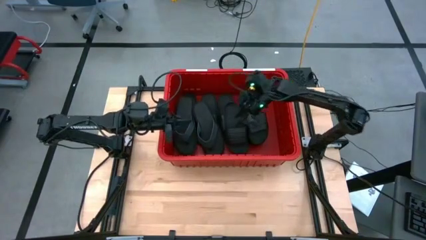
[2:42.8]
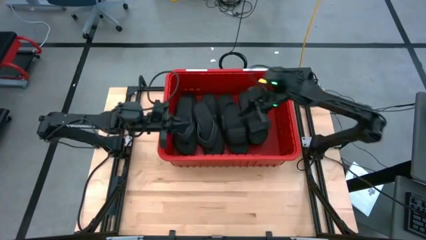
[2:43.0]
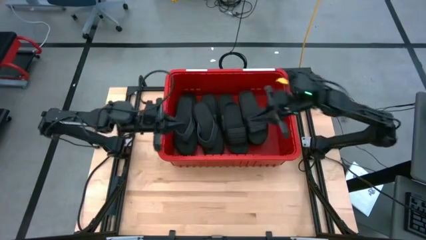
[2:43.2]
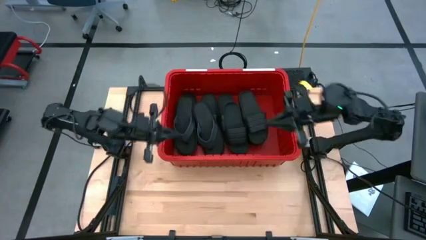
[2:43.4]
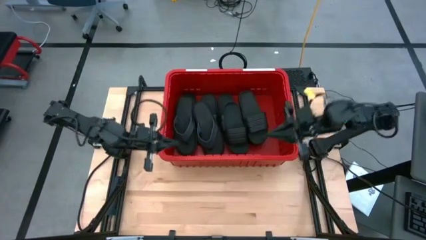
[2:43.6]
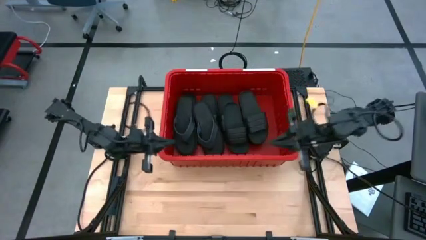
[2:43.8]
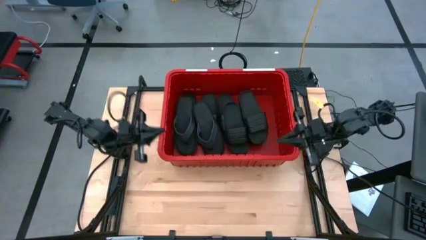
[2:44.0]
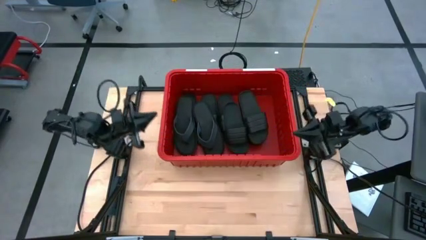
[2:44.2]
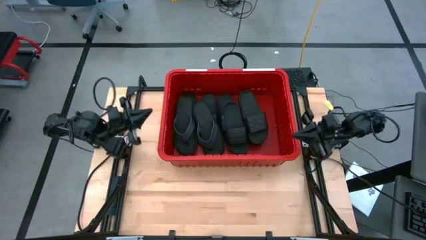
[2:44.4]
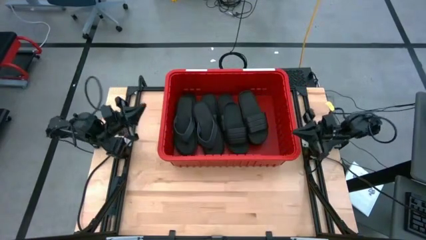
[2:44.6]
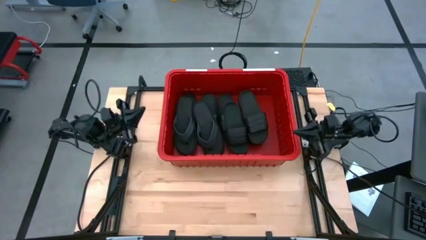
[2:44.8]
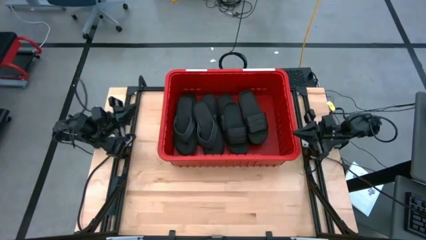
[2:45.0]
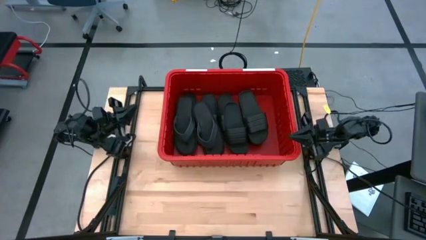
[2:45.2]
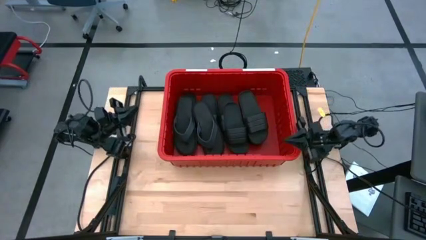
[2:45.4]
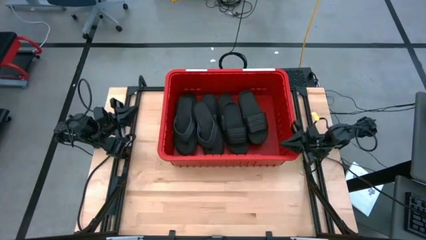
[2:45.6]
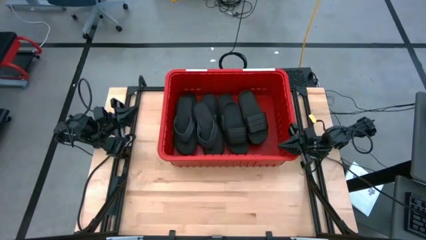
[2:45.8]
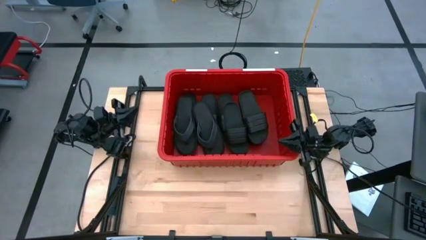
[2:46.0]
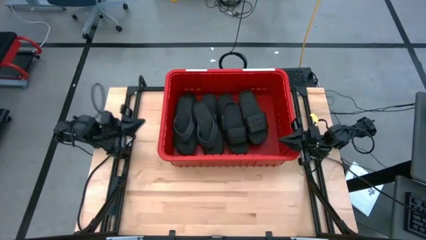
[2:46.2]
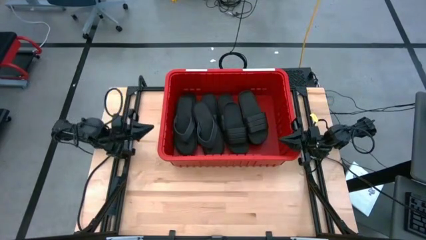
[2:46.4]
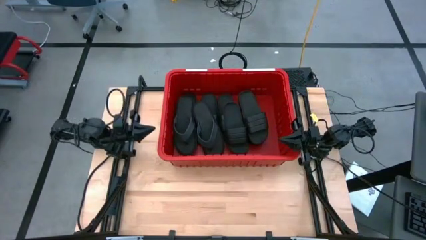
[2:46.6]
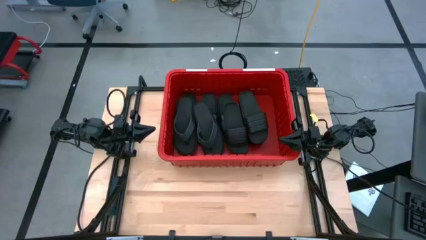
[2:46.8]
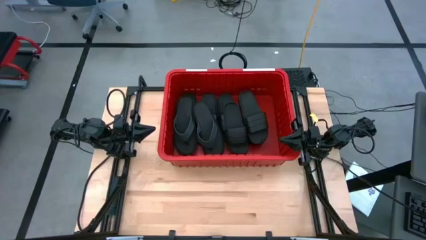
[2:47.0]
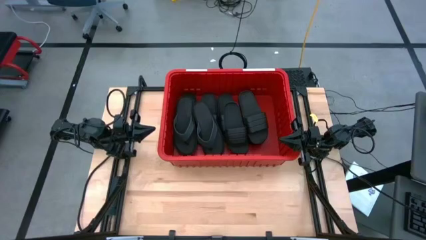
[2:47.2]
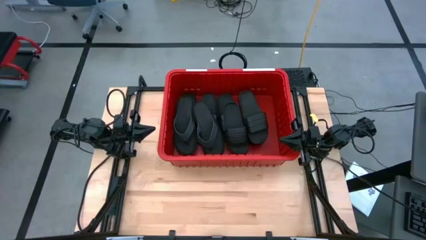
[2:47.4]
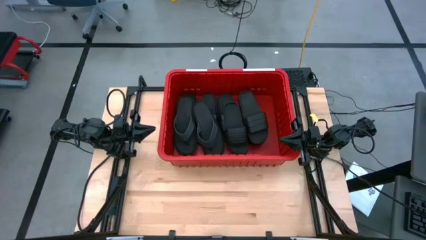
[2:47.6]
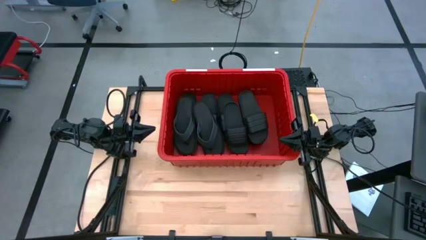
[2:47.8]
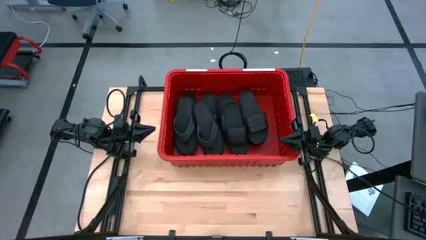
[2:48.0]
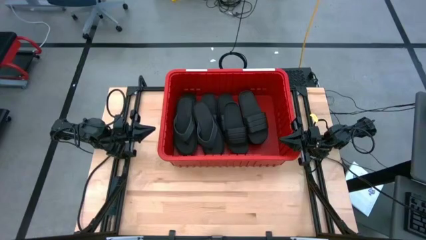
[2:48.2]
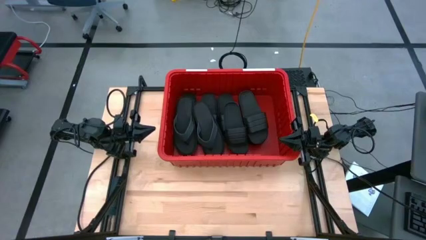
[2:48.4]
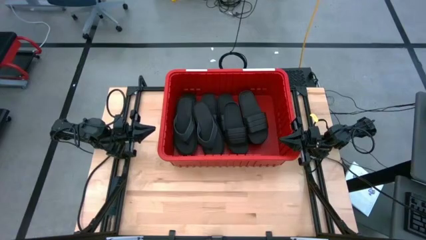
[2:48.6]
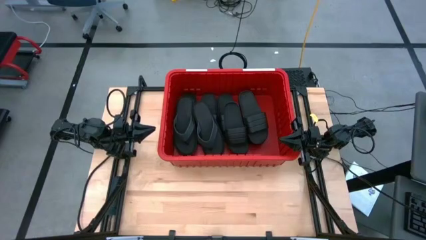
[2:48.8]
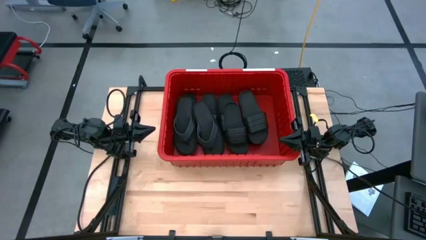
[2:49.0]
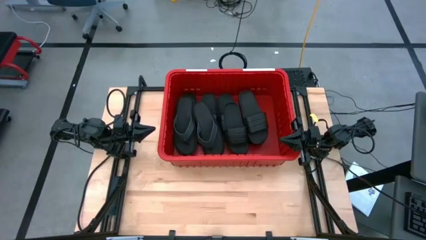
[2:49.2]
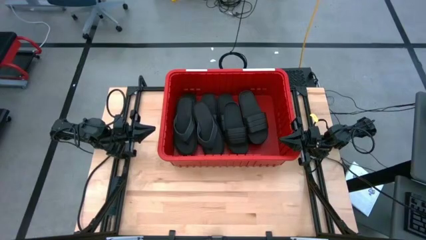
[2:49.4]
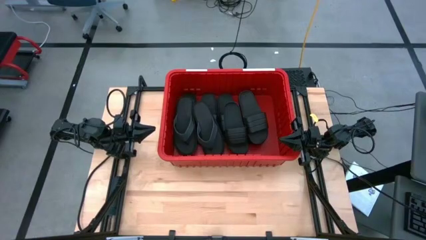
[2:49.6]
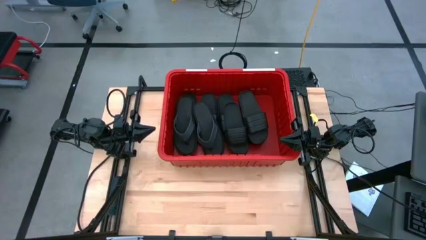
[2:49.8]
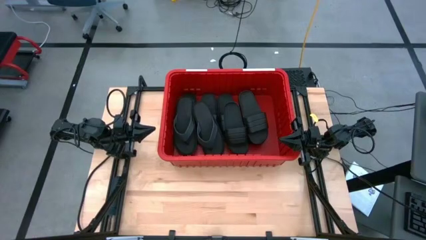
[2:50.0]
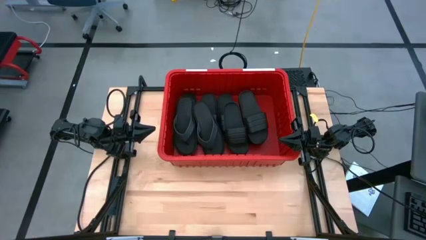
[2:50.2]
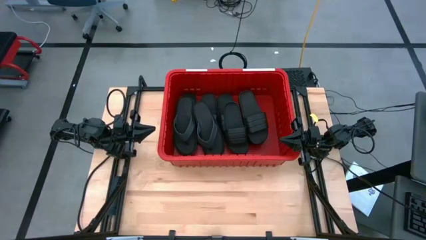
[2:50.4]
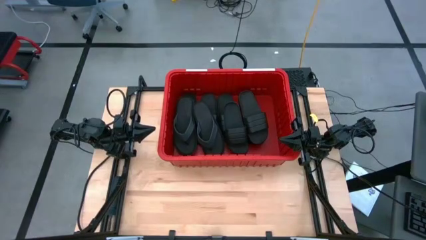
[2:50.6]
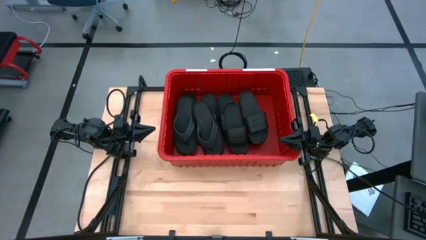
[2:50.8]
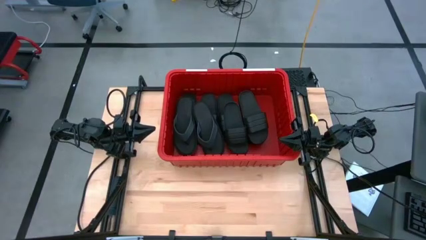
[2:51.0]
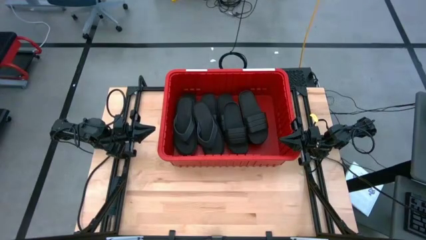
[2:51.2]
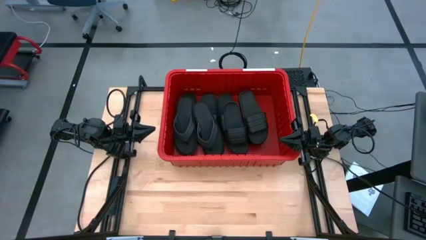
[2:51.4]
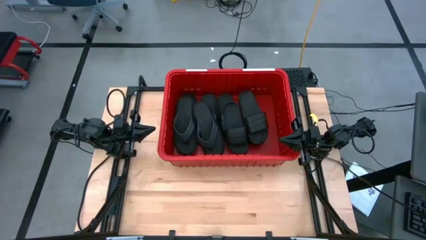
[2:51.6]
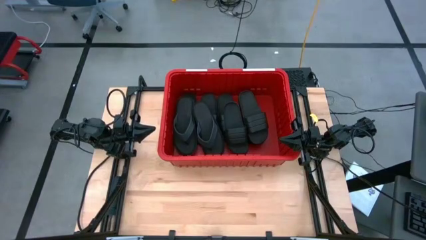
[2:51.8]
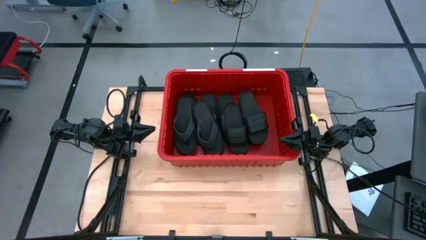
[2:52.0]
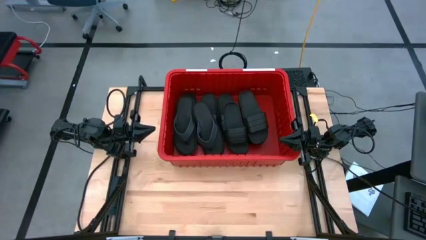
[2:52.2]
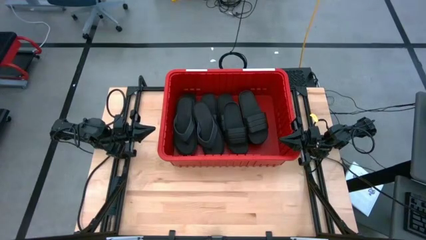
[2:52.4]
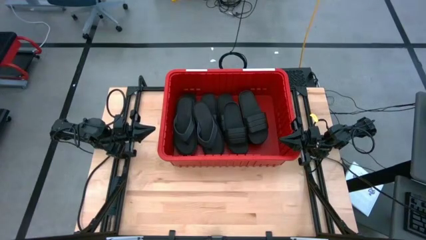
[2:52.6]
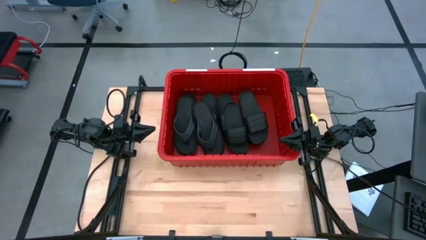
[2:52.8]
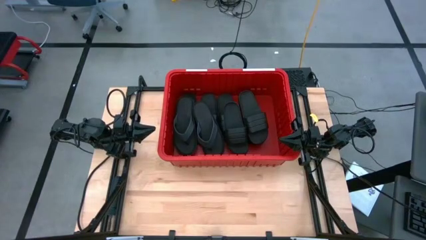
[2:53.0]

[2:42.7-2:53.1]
Task: Pick and place slides into bin
Return to Home Position
